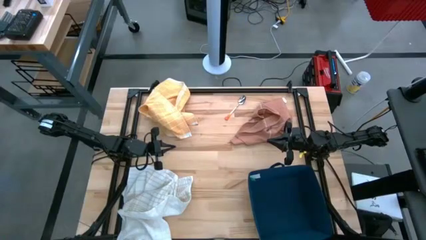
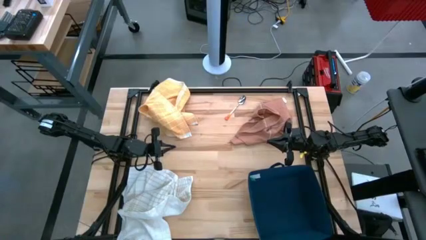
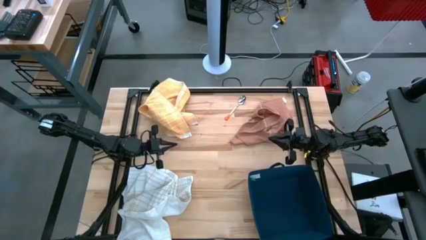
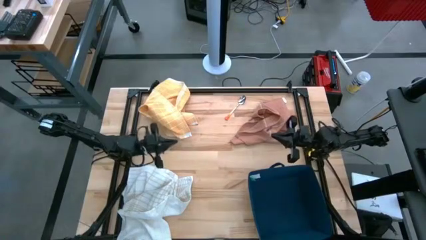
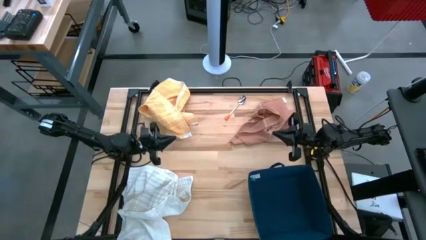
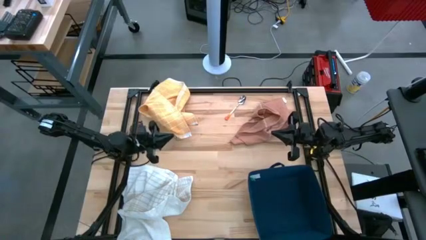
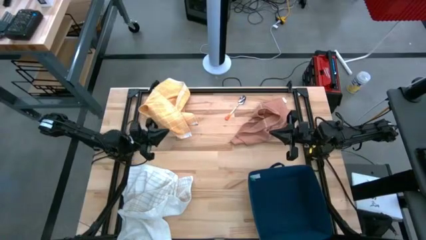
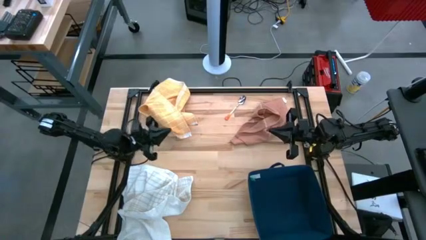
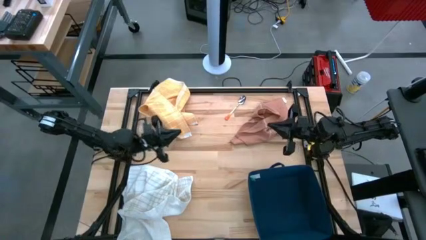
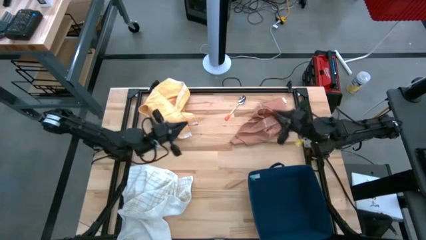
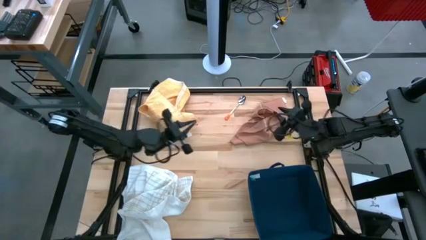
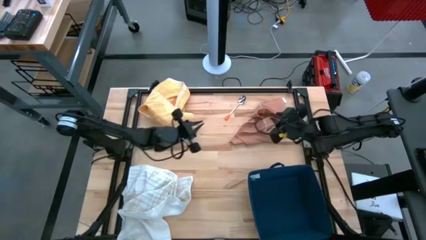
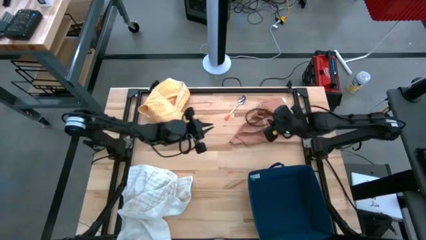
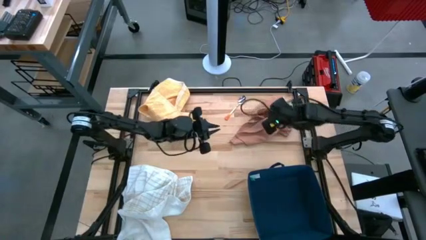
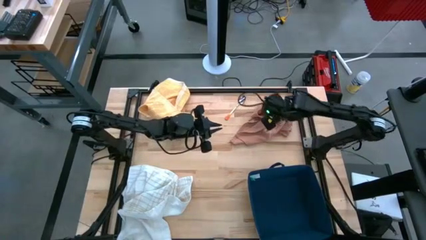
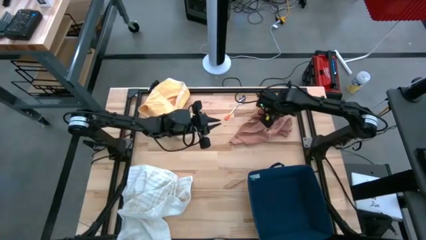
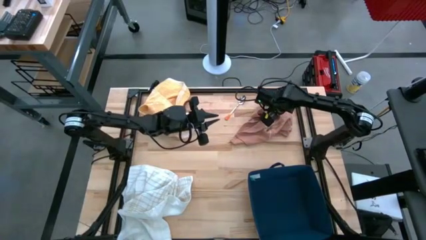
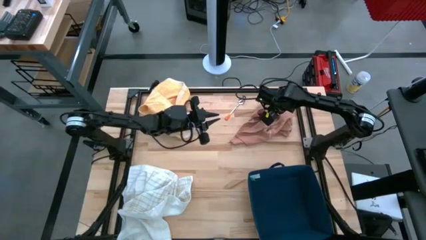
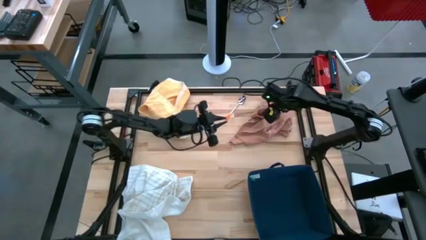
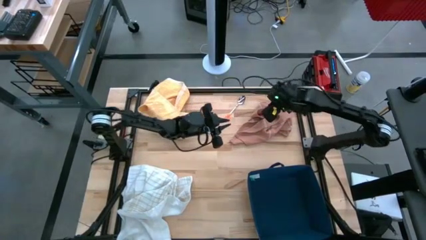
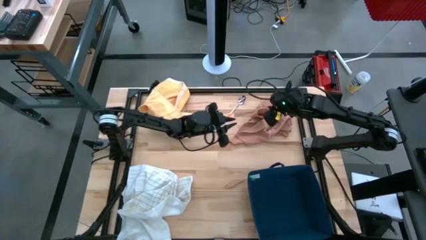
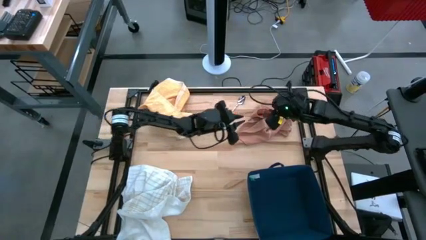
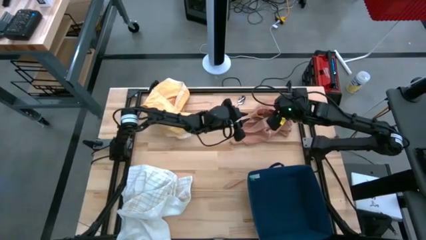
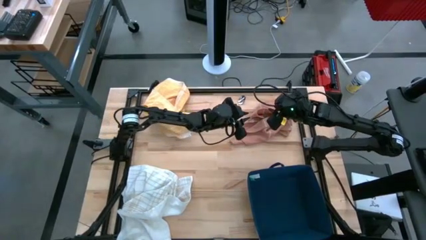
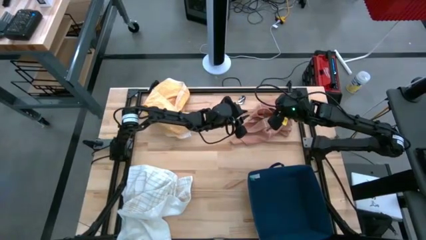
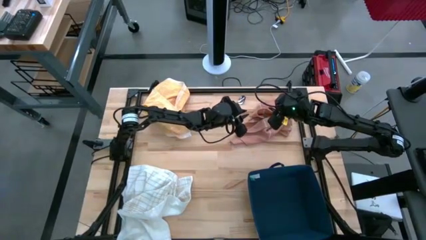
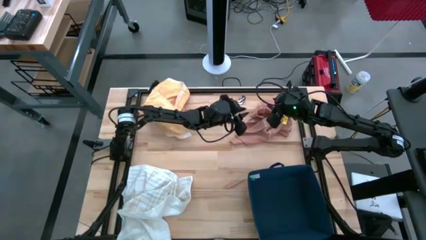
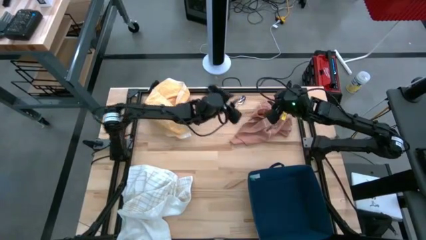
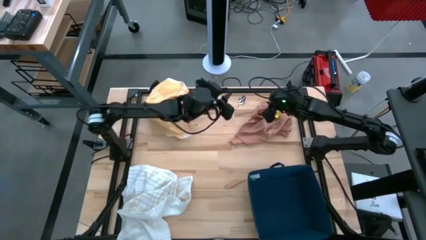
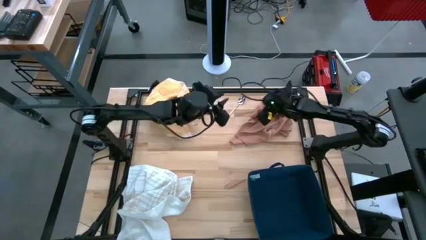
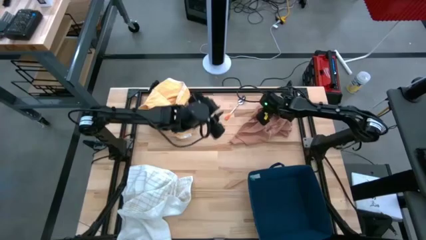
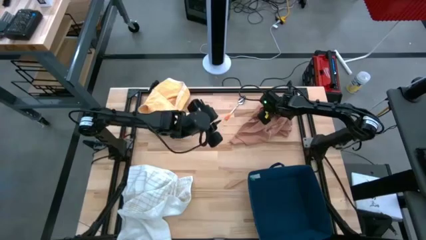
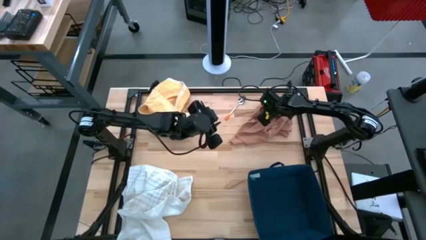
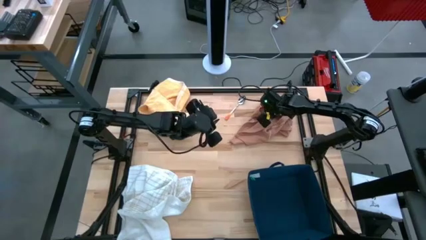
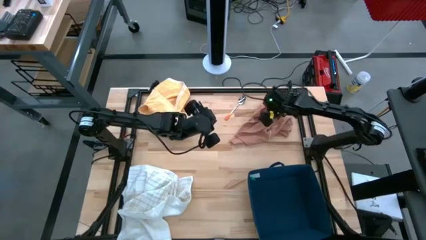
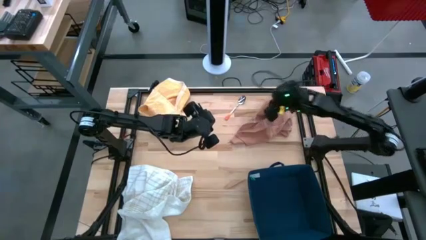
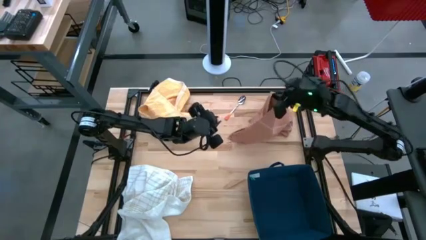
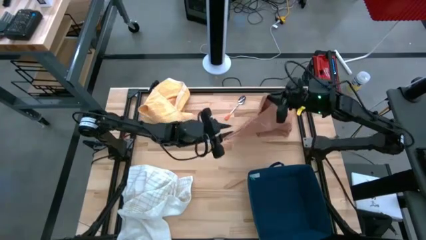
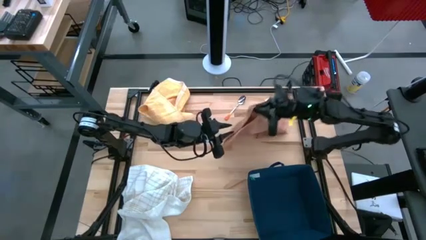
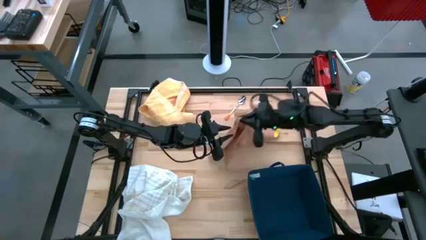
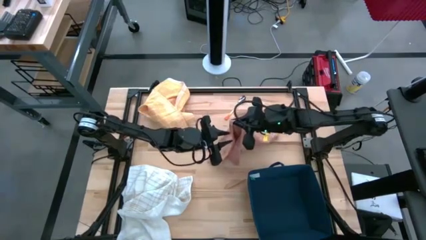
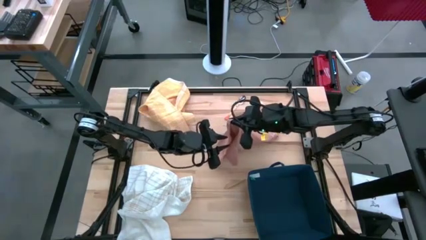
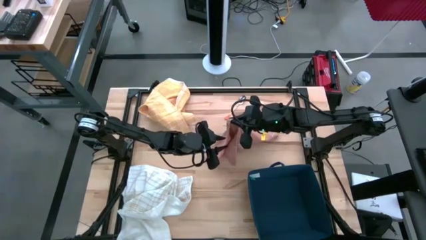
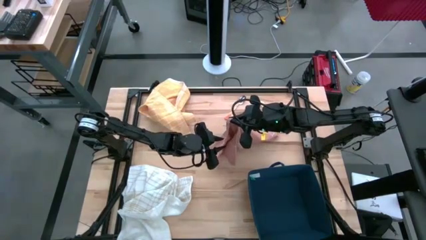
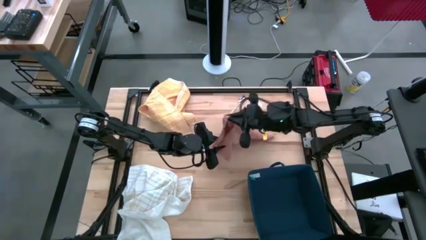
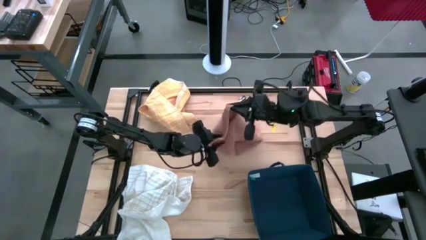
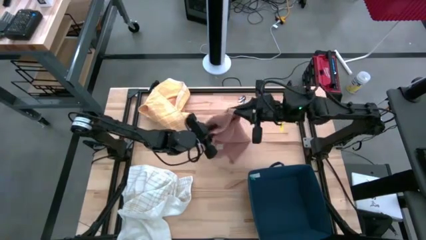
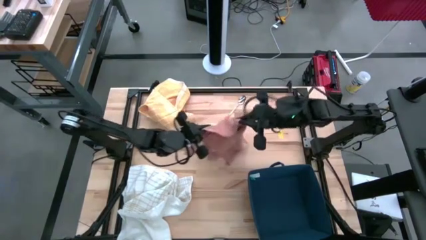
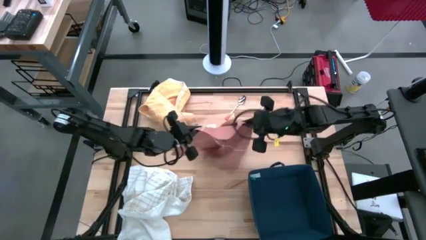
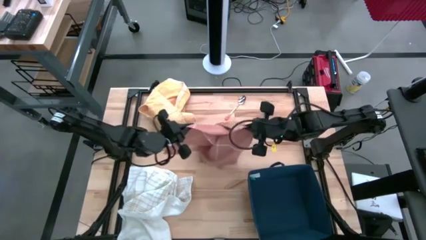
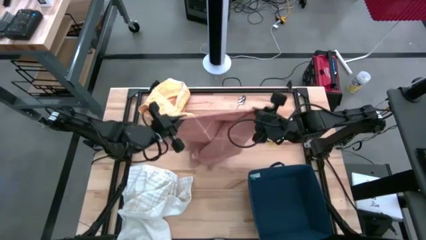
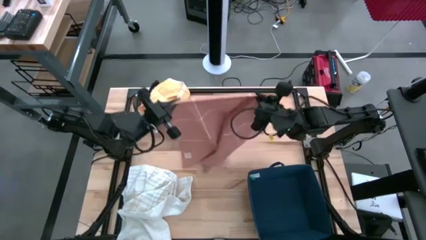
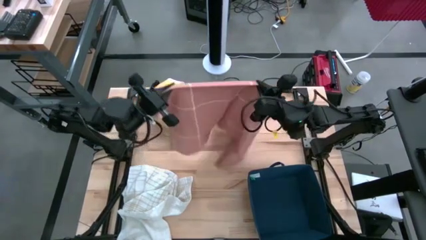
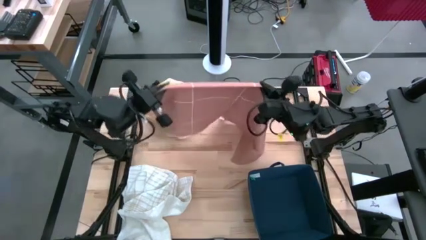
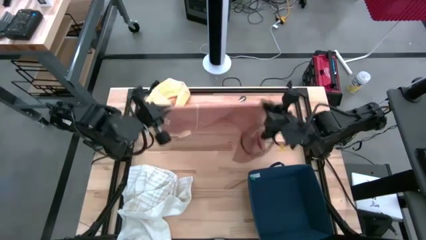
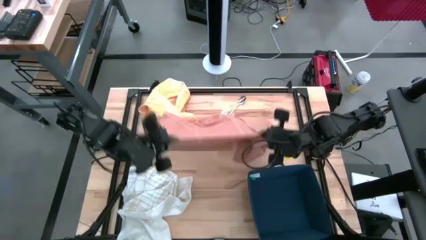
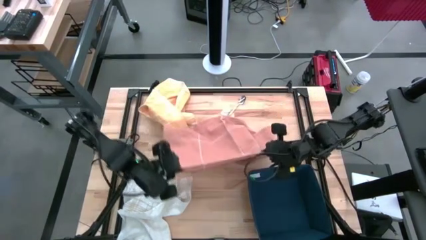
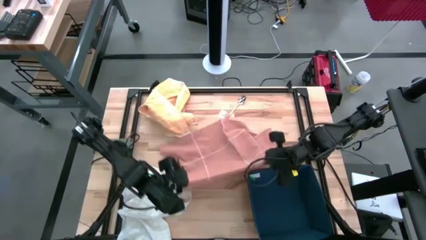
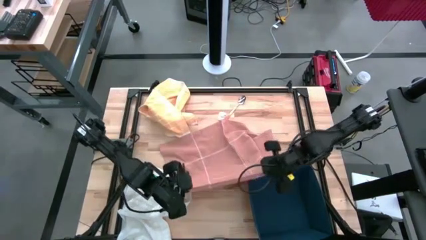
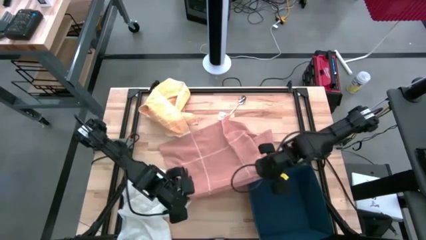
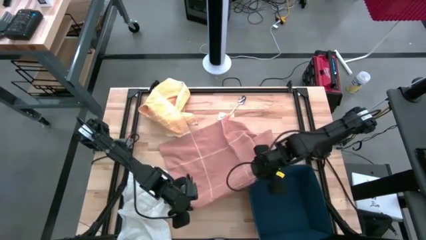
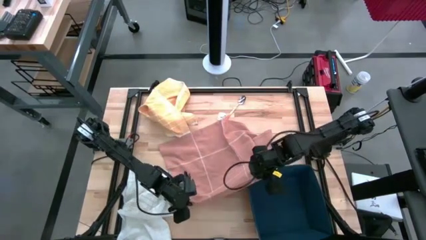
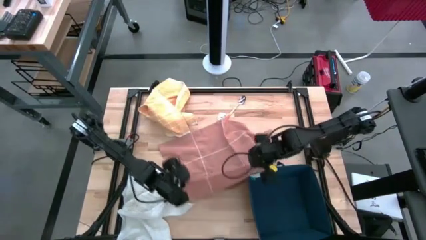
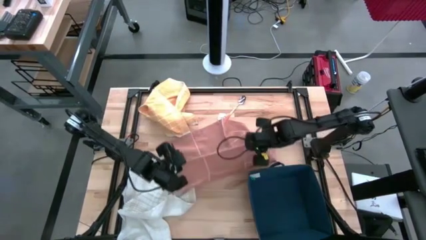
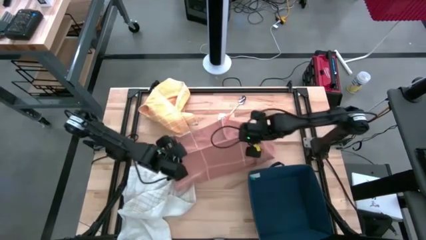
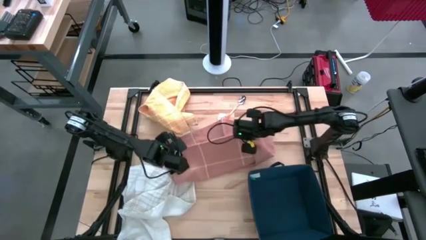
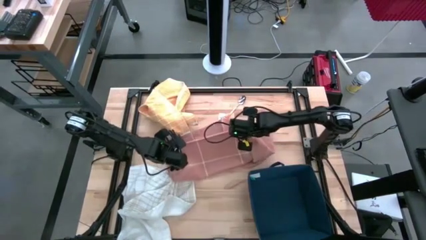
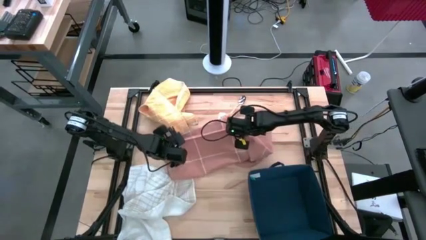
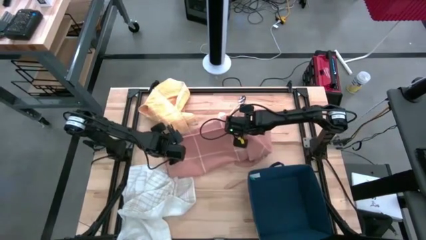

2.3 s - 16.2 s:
Task: Fold towel
Fold the brown towel
